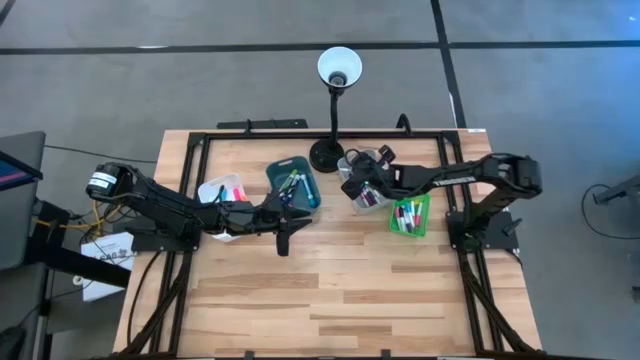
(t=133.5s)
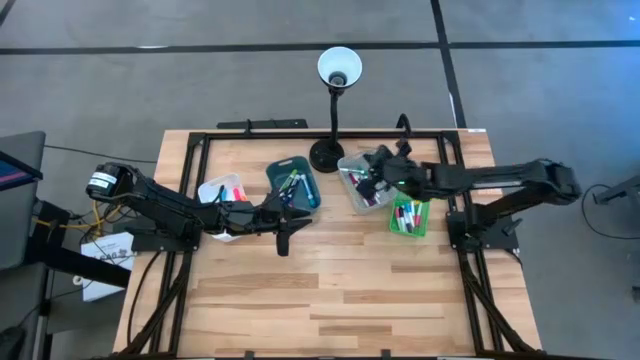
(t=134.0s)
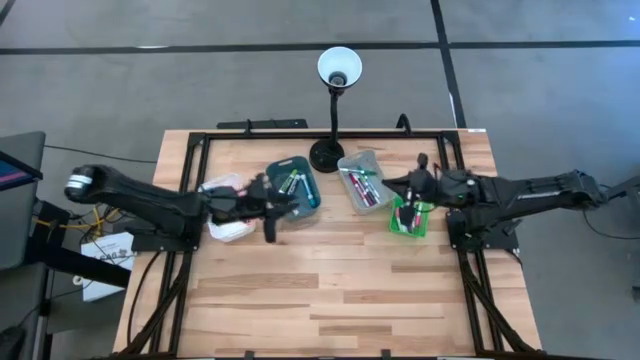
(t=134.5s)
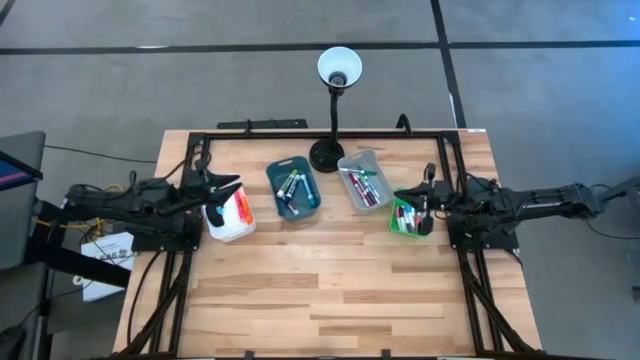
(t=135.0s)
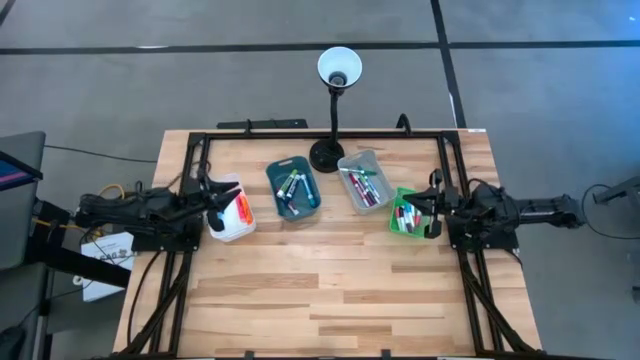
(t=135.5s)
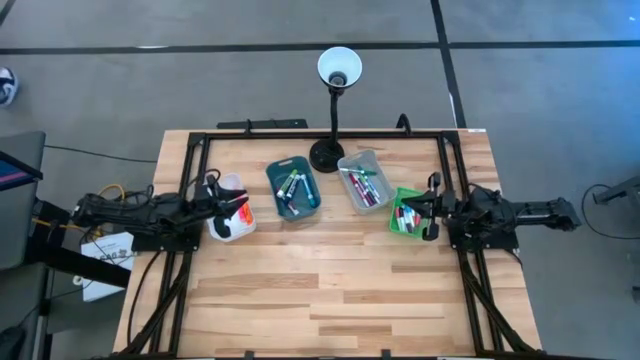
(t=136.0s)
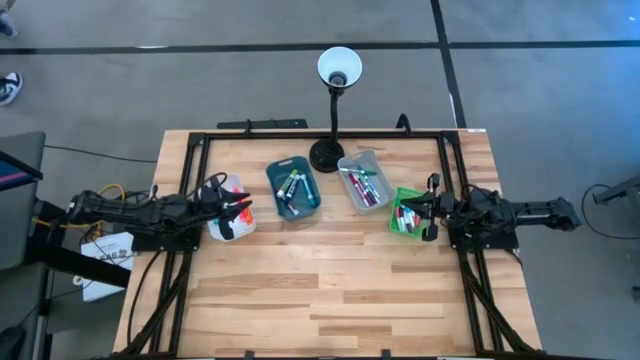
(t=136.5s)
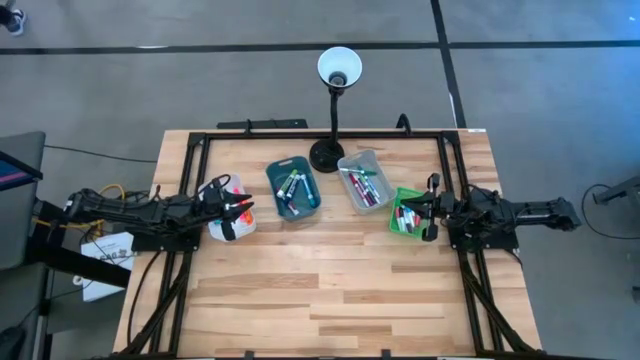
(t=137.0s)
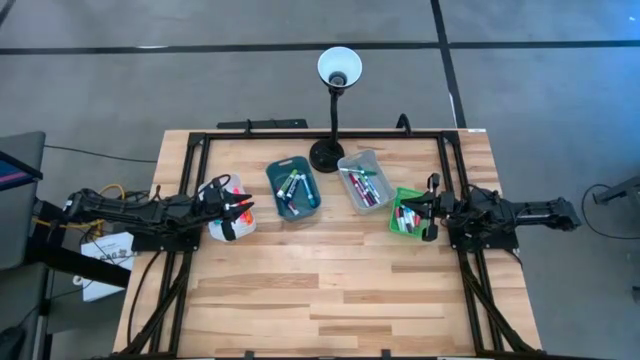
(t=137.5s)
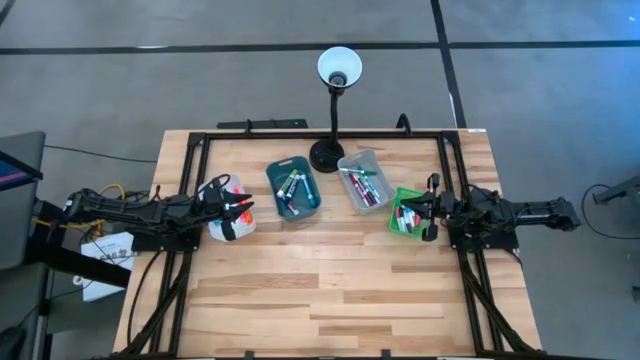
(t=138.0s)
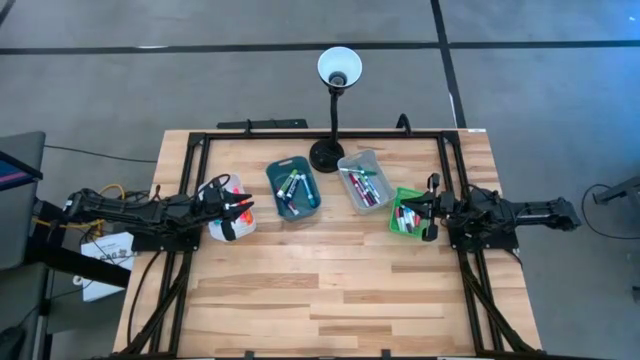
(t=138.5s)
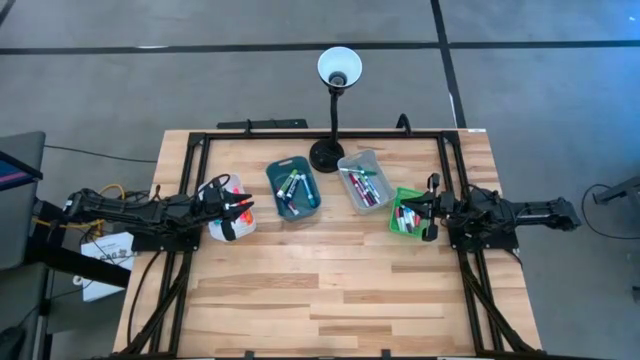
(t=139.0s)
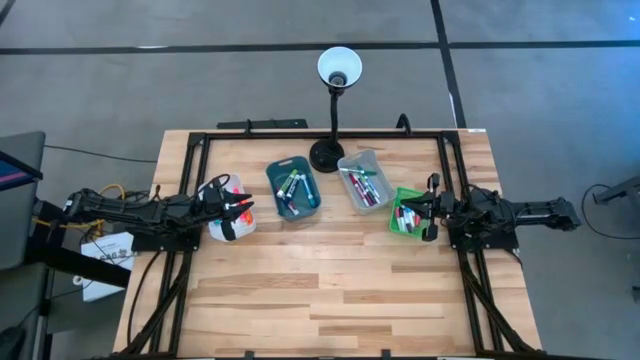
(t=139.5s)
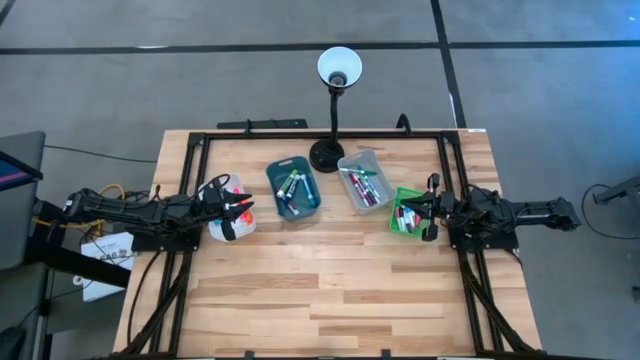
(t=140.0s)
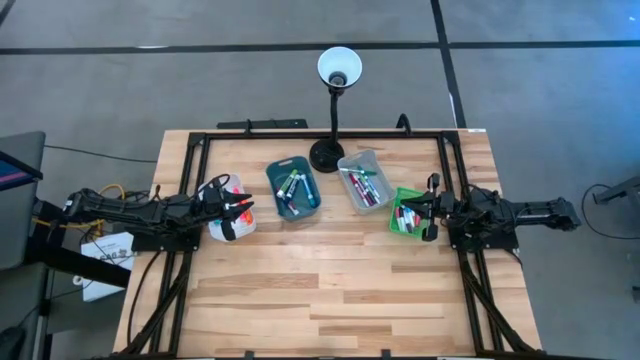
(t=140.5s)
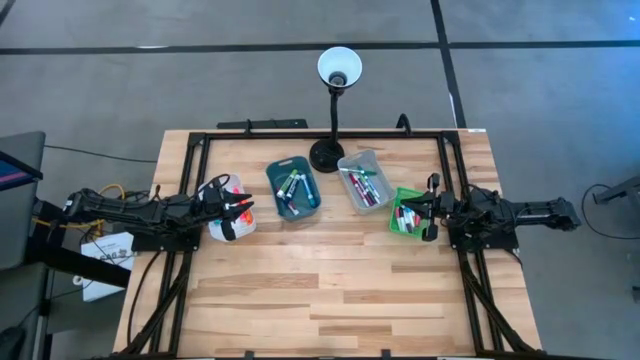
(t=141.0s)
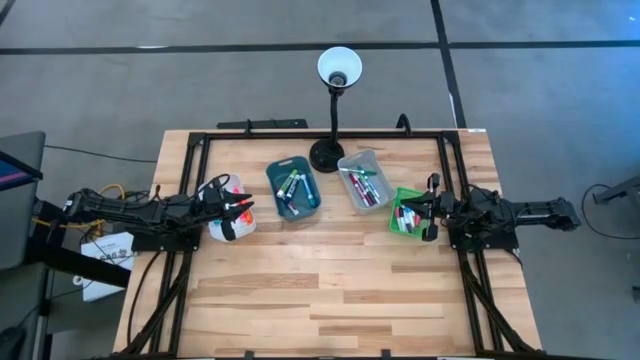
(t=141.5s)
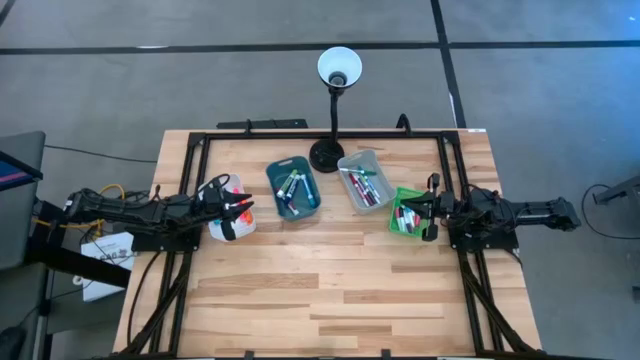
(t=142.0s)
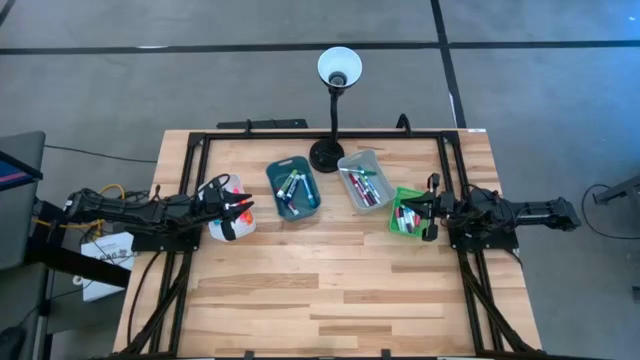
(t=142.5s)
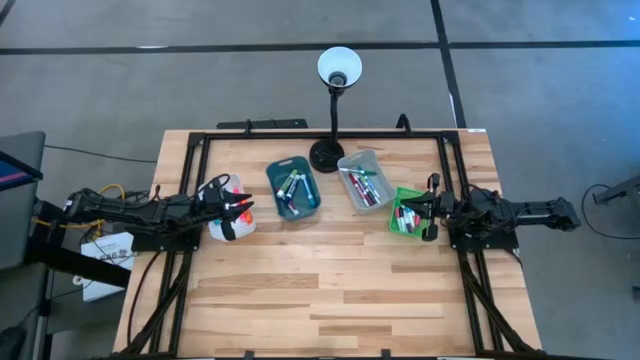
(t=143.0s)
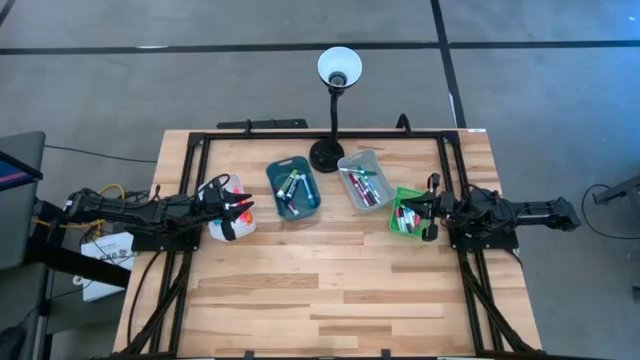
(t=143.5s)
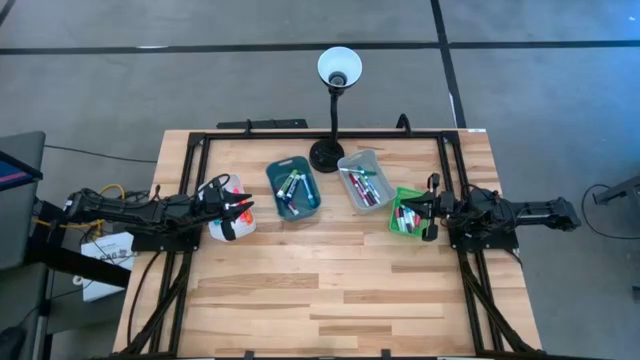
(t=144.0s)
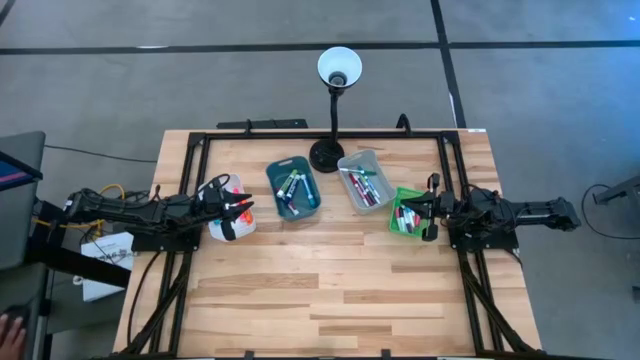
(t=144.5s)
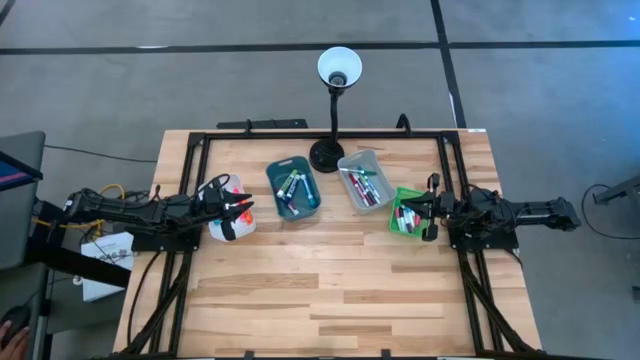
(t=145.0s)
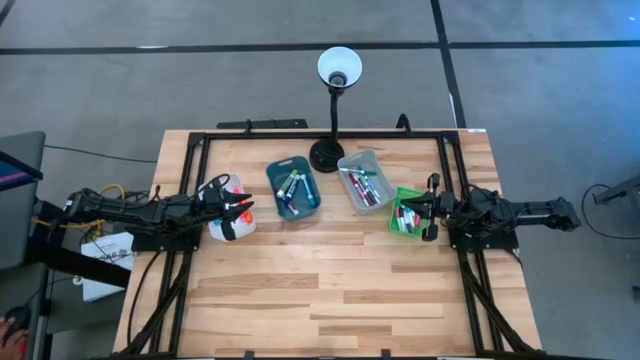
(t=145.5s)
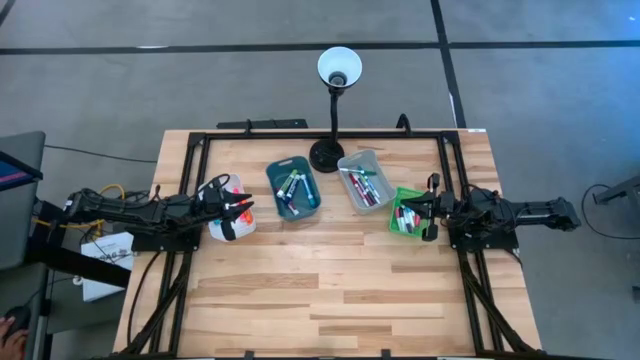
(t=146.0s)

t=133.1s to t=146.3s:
Task: Pick & Place Markers
Return to Home Position

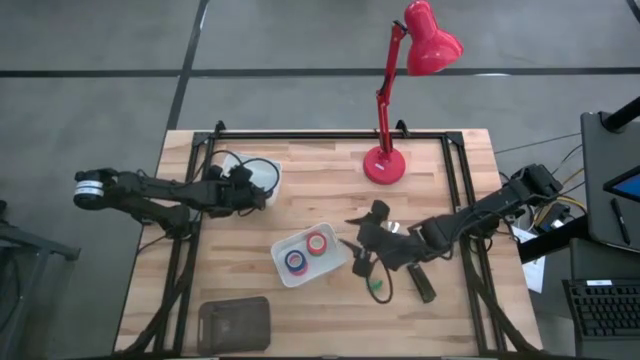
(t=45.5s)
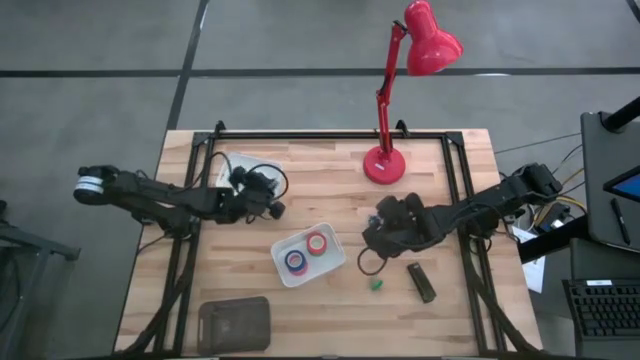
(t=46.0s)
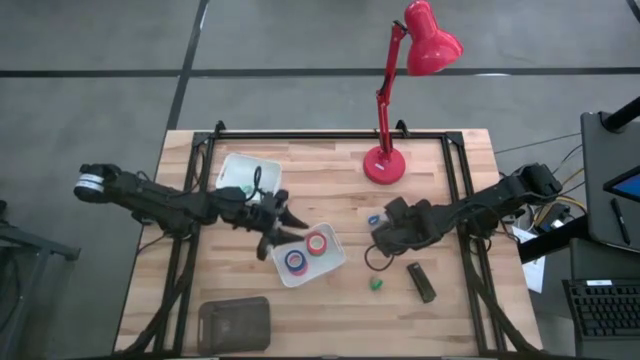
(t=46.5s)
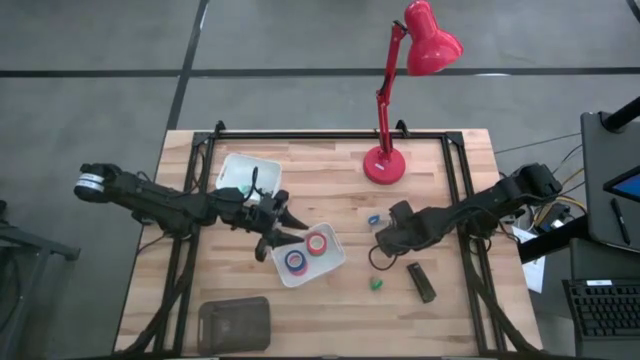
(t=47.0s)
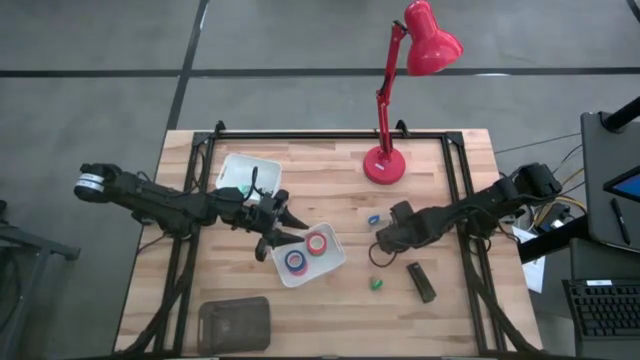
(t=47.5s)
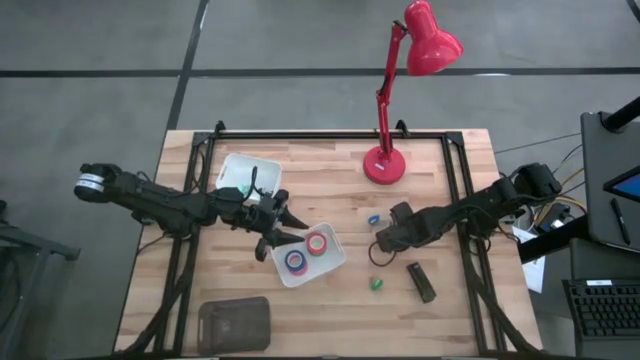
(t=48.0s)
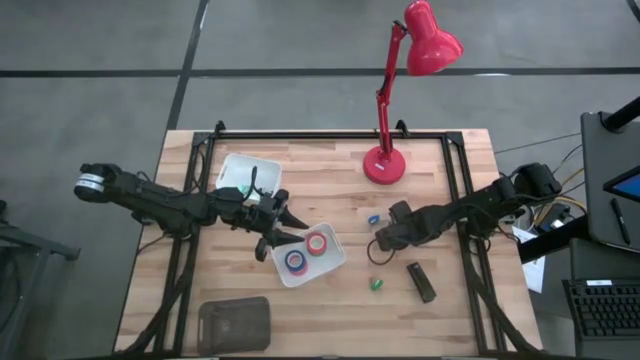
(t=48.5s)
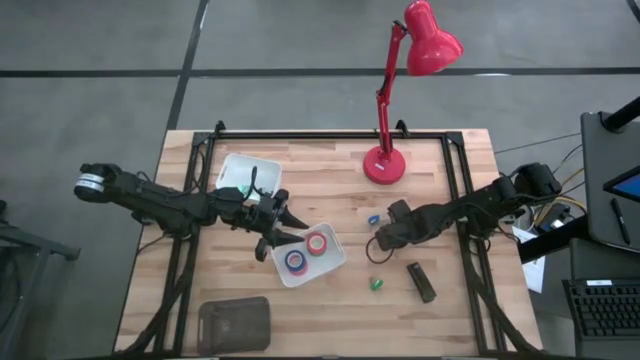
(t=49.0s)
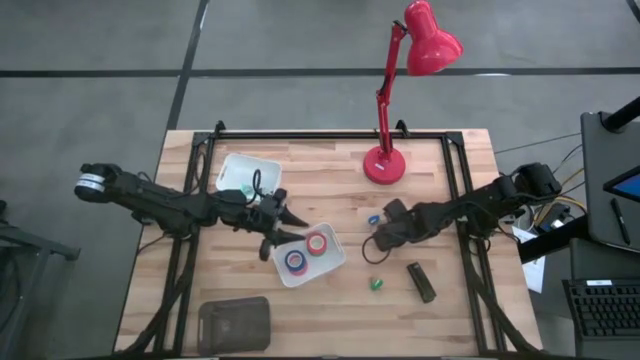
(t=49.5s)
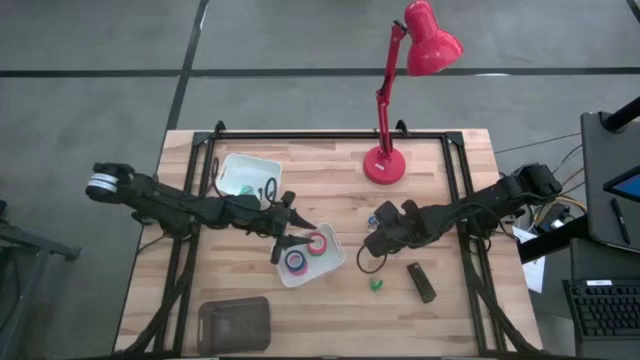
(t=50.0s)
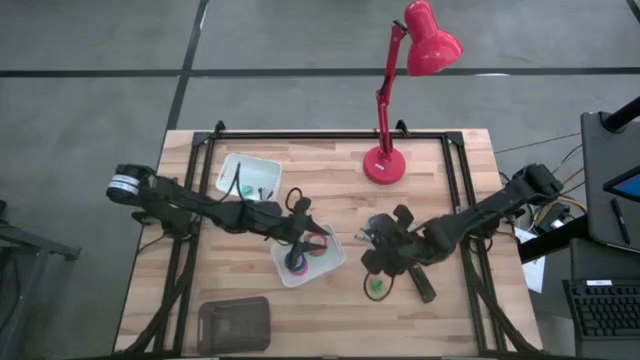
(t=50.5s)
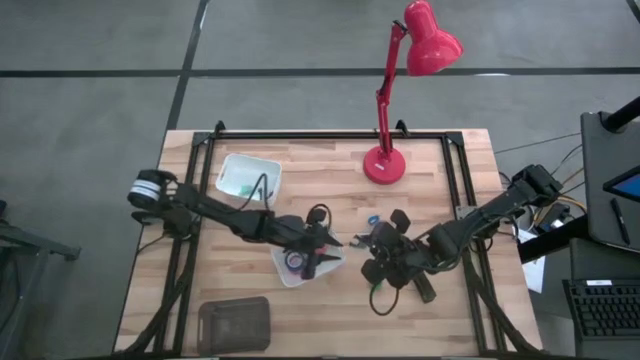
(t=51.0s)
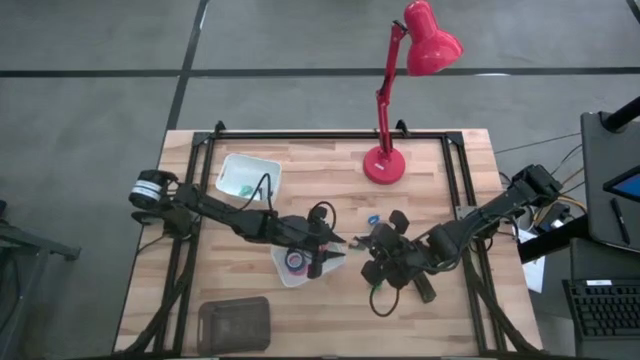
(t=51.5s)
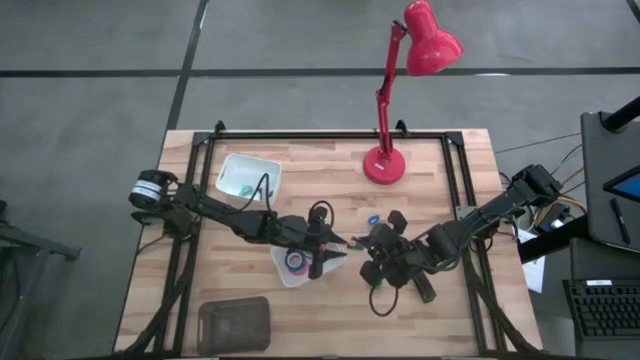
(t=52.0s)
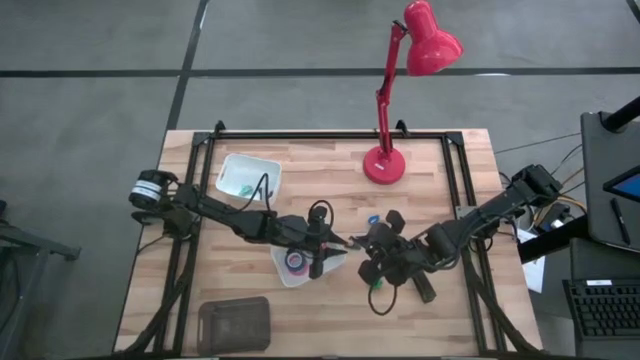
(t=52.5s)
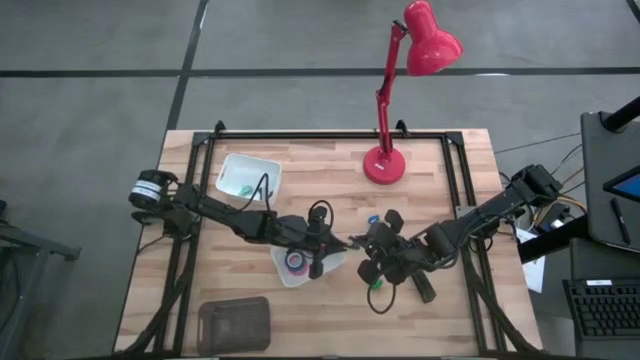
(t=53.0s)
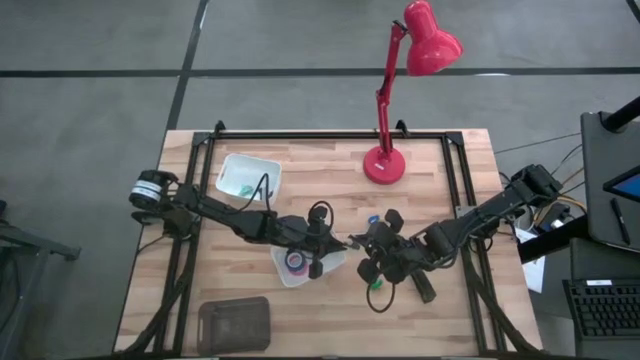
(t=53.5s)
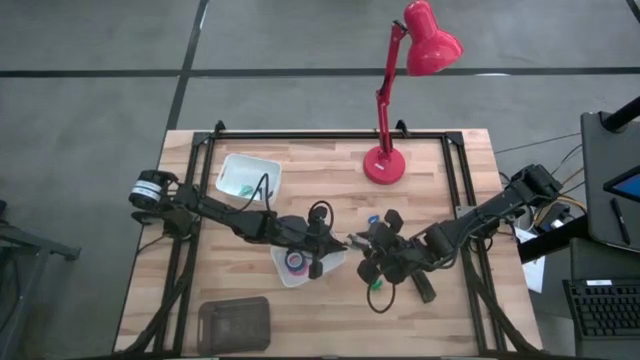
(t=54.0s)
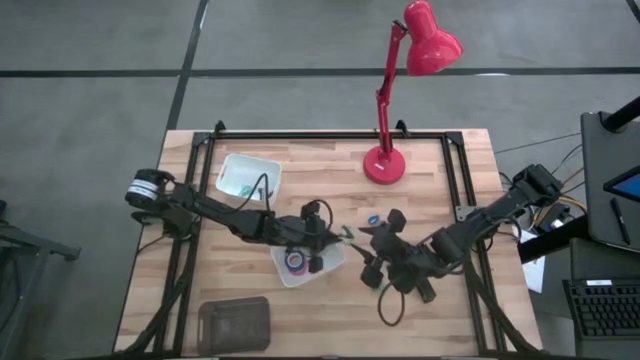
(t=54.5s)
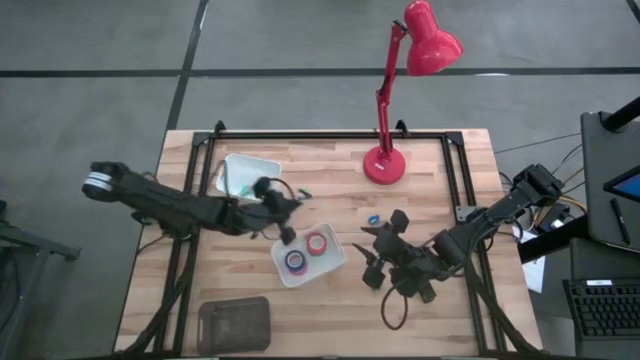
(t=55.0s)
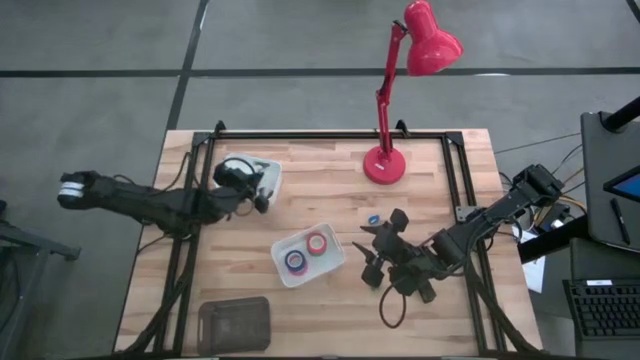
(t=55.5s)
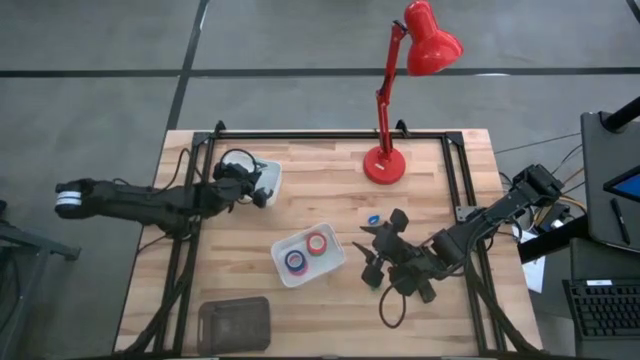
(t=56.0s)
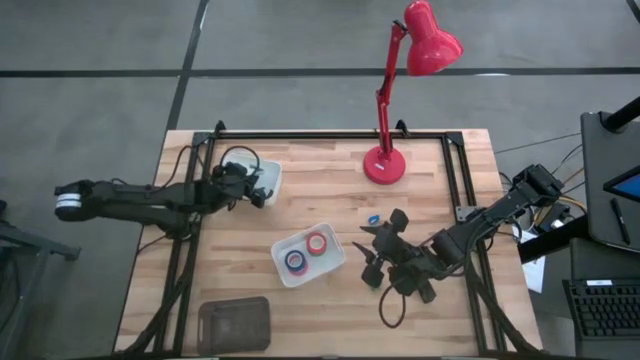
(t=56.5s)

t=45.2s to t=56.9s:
Task: Pick and place Stapler, Stapler remover, tape
Put the light blue staple remover into the top white bin
